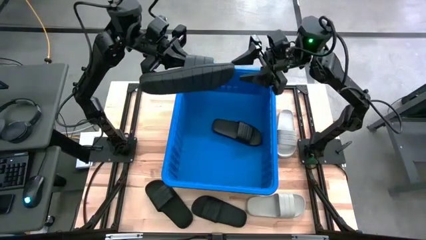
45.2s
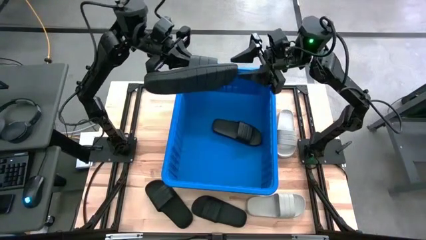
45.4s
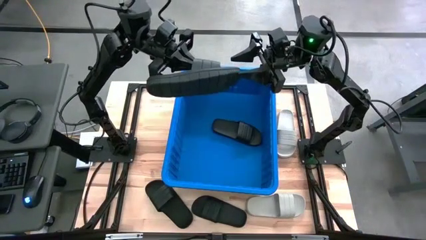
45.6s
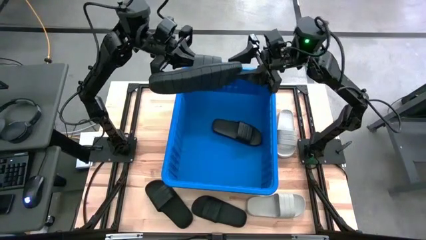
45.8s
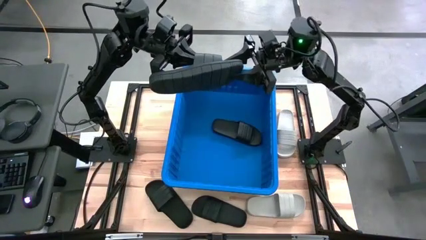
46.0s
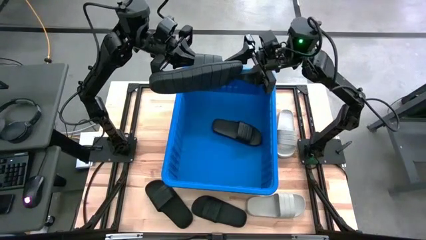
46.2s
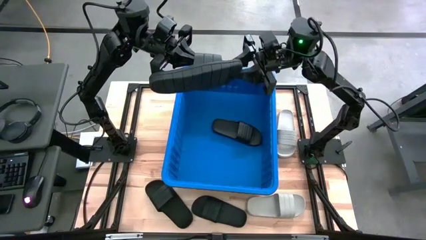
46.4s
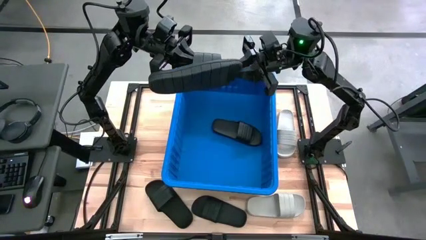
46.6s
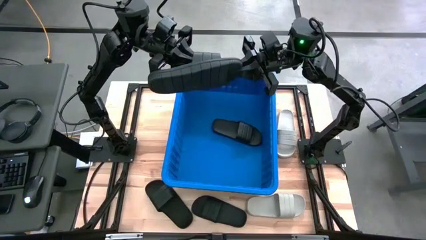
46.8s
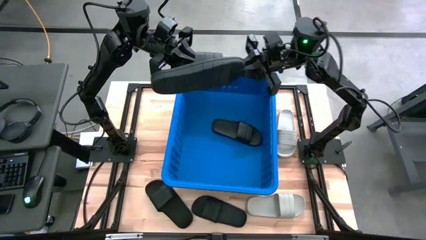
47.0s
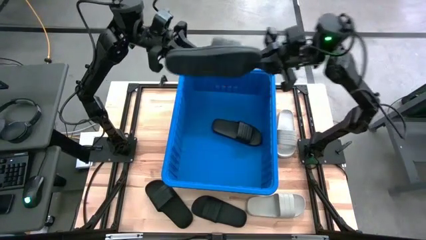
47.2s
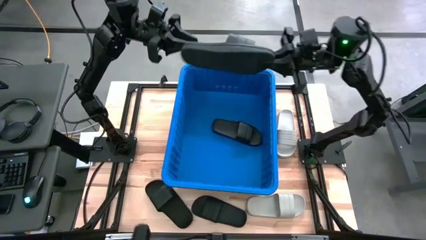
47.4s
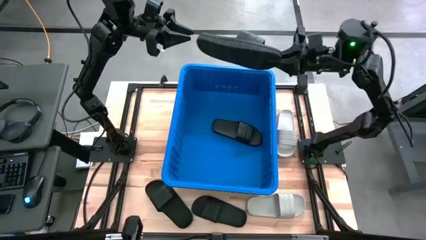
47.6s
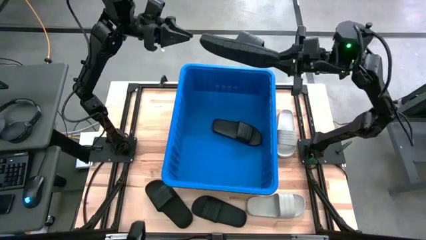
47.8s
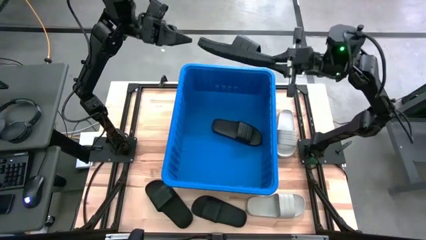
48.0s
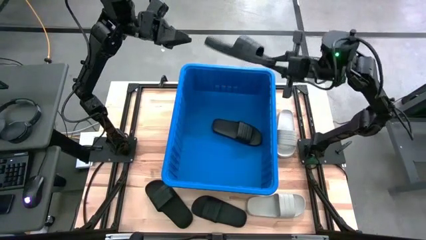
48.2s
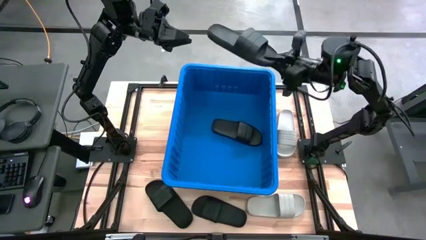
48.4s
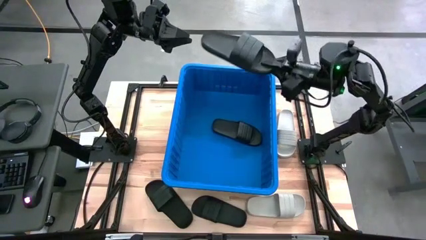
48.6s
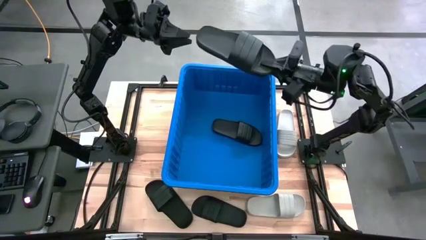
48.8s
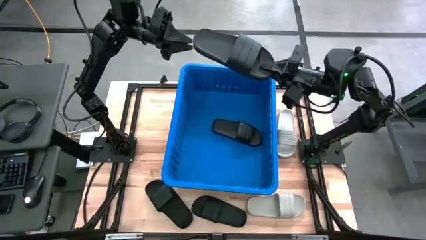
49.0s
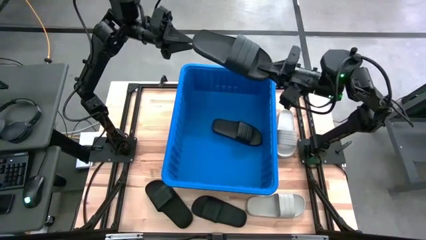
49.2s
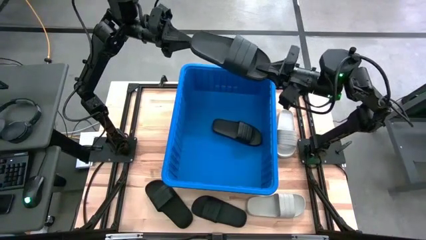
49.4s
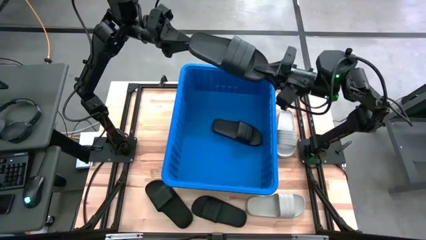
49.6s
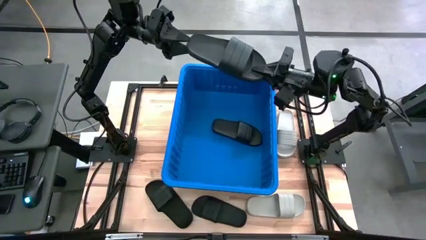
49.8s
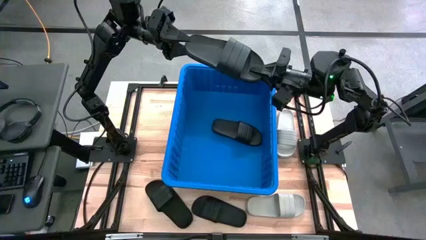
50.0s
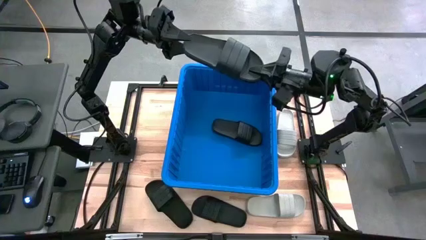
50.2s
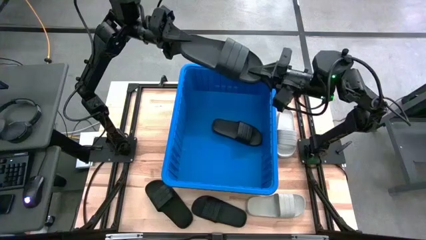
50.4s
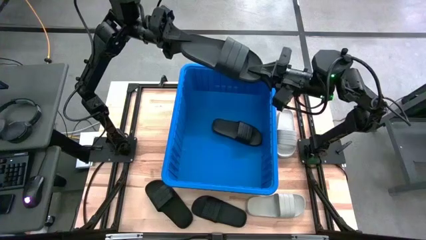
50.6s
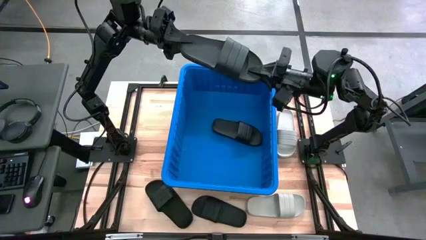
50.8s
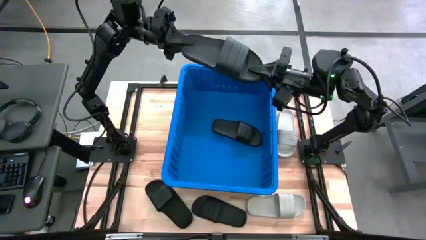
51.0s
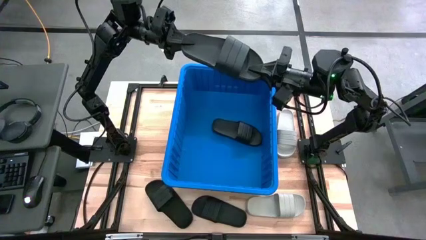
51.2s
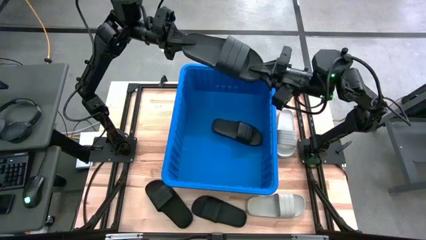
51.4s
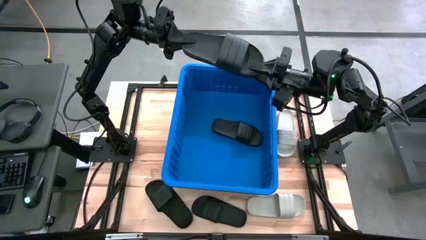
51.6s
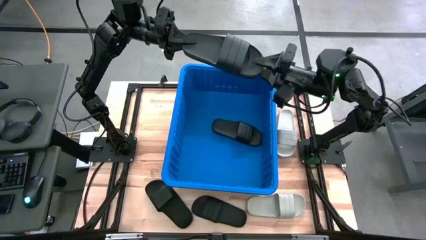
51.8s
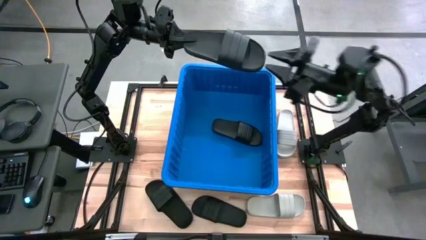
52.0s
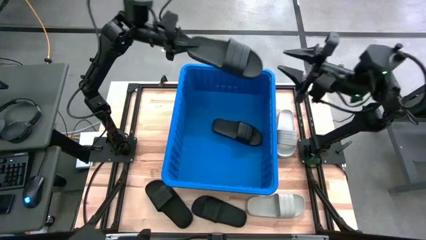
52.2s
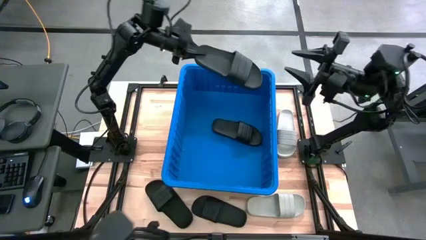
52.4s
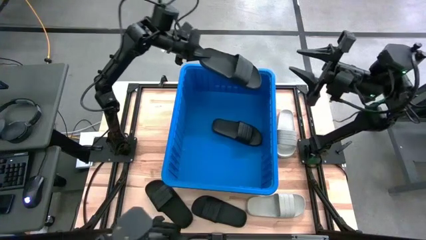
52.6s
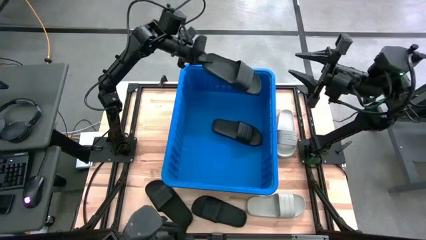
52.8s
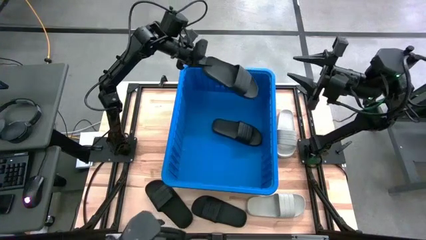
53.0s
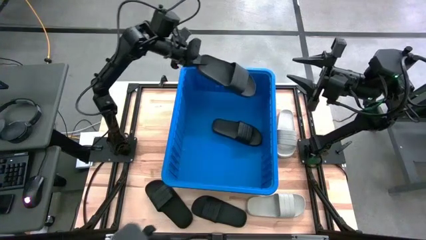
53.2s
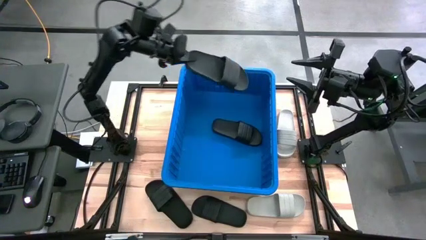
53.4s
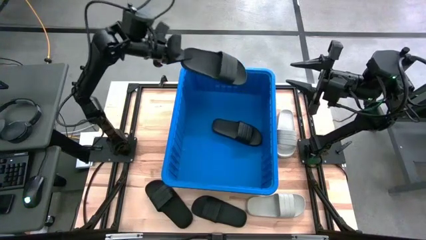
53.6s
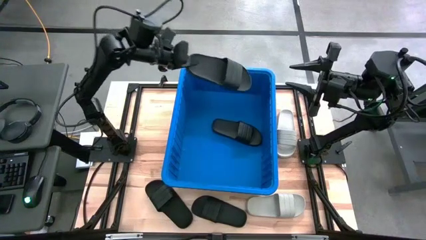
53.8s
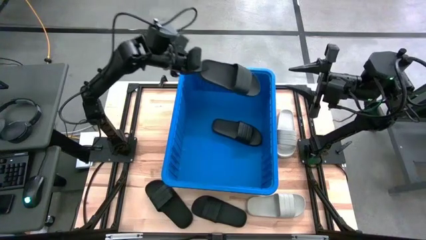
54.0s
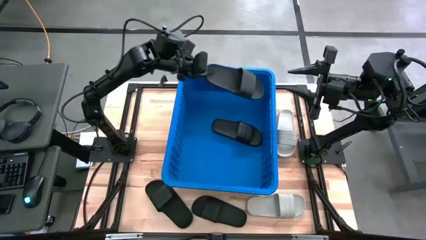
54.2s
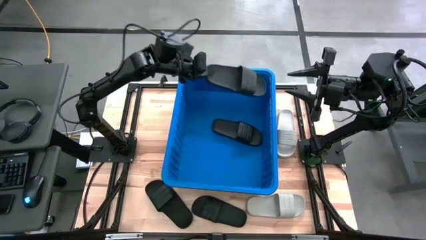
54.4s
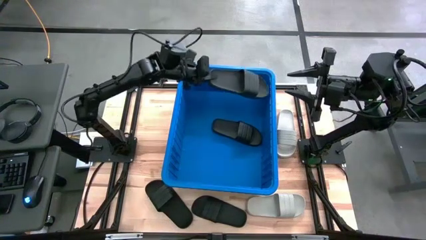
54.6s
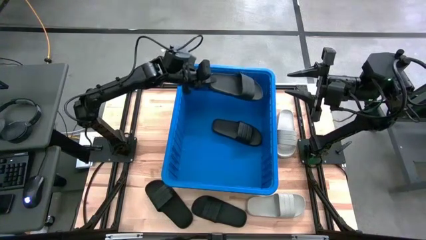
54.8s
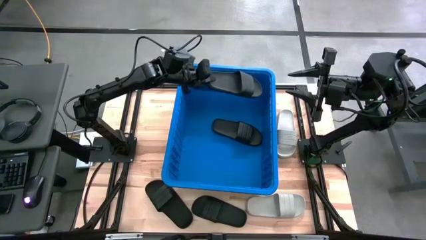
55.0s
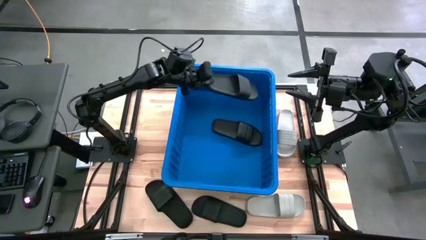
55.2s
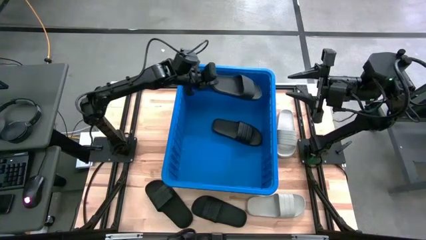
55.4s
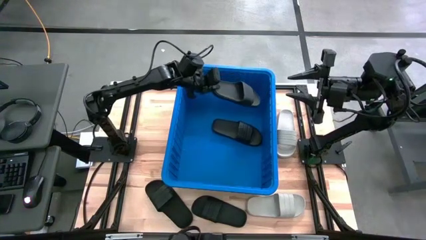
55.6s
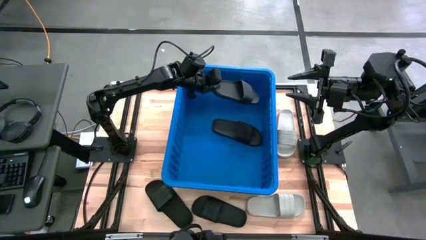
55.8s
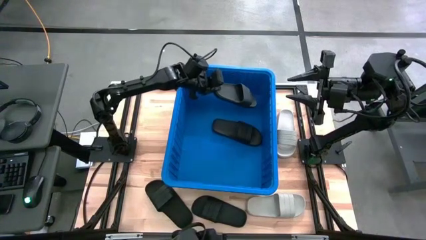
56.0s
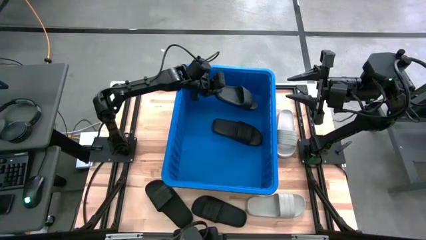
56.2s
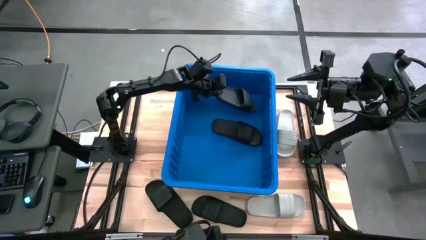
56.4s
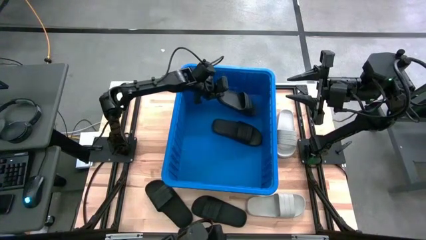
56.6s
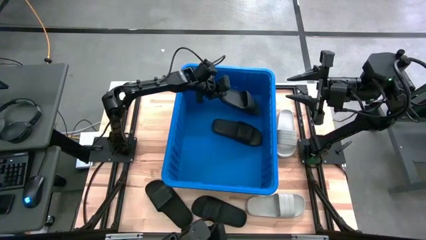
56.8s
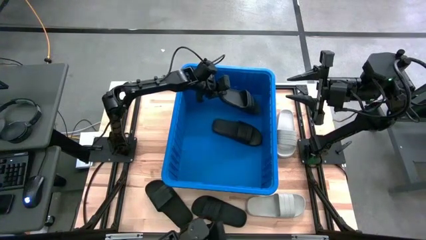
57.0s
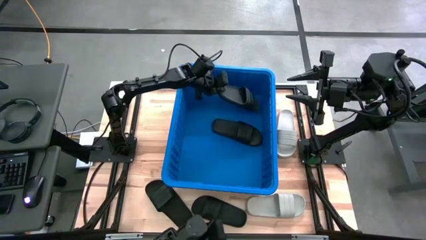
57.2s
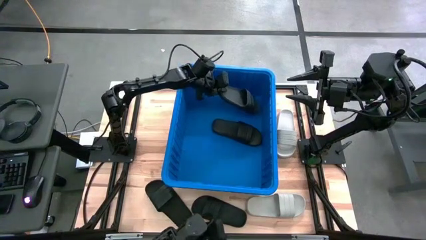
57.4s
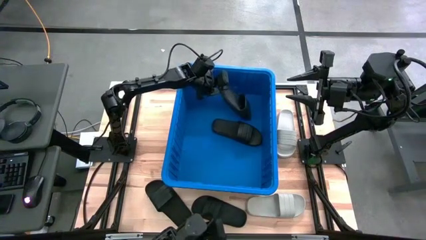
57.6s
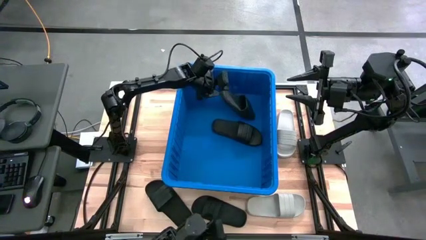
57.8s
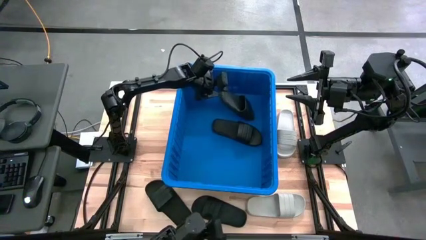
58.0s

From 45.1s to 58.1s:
Task: Pick and place slides into bin
Put the black slipper into the blue bin

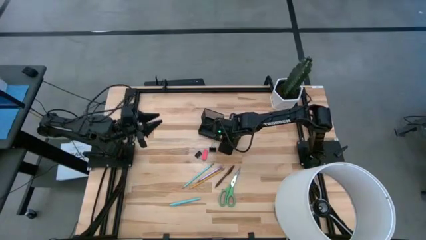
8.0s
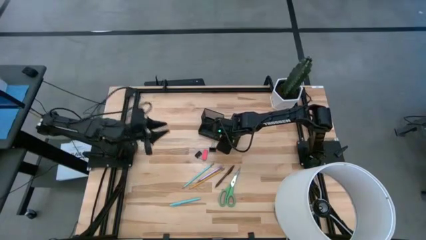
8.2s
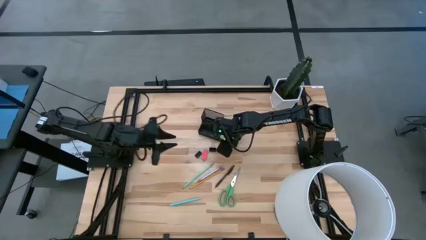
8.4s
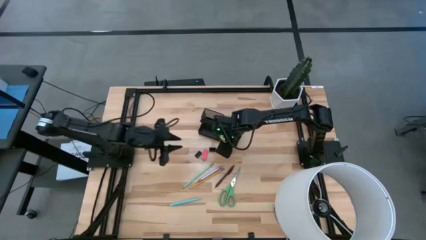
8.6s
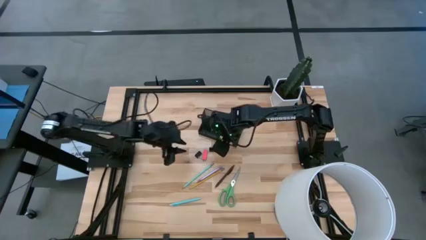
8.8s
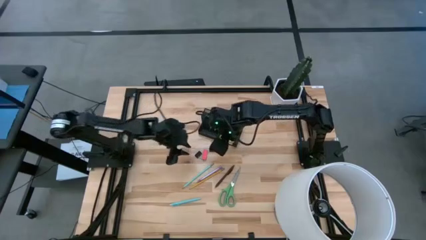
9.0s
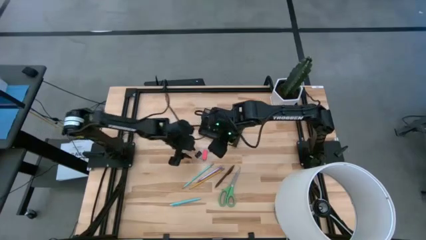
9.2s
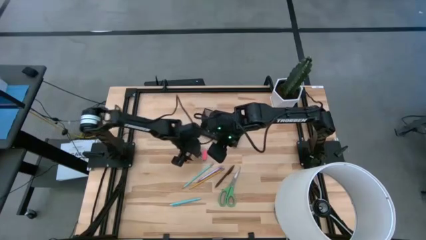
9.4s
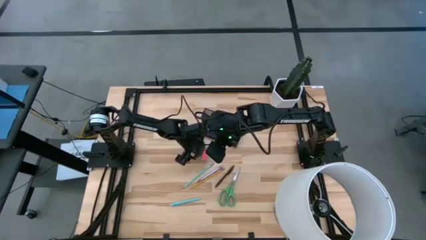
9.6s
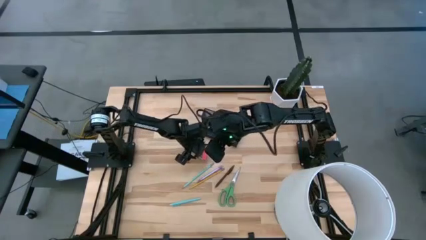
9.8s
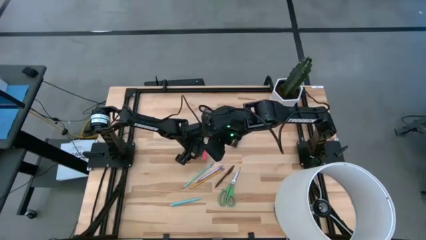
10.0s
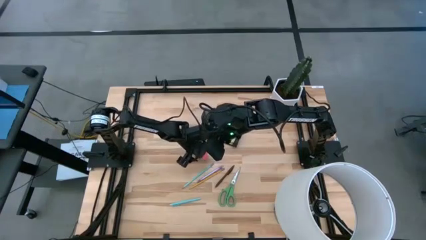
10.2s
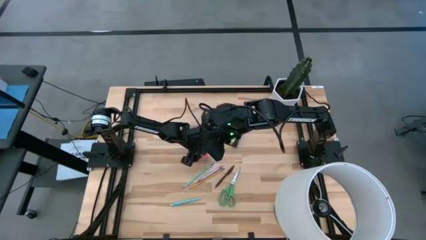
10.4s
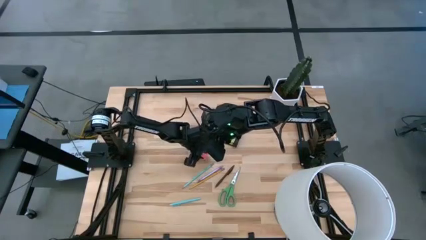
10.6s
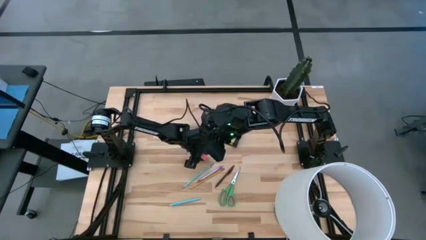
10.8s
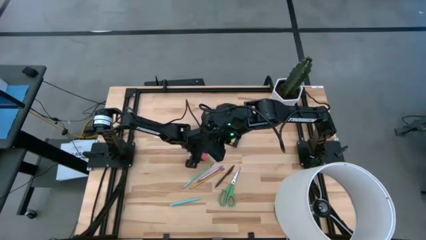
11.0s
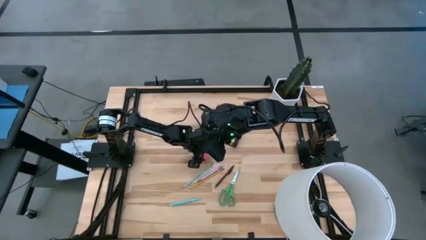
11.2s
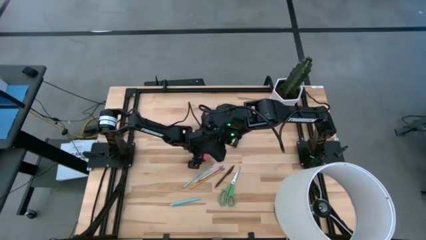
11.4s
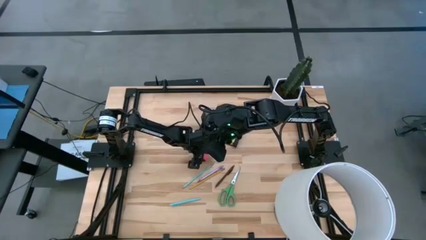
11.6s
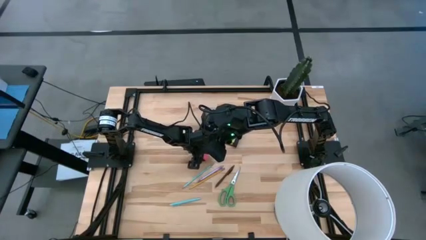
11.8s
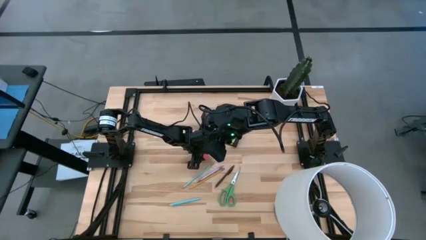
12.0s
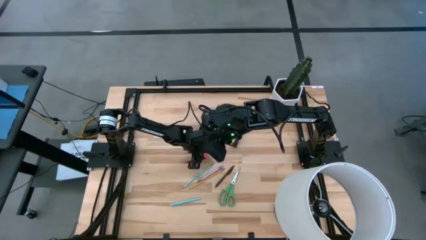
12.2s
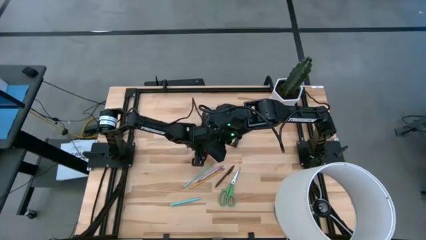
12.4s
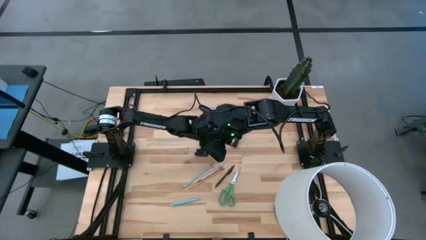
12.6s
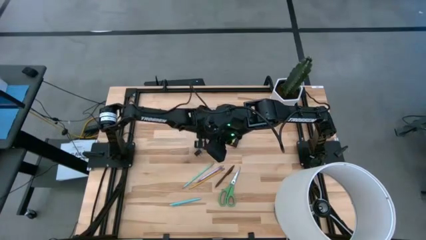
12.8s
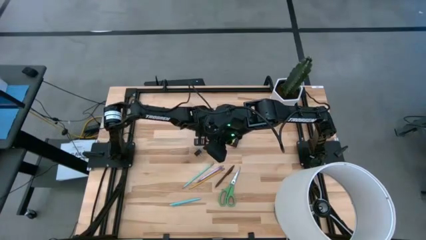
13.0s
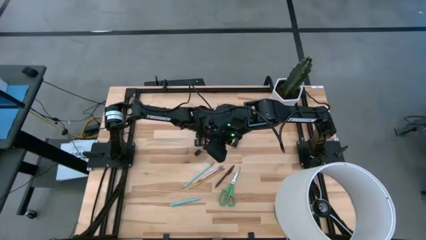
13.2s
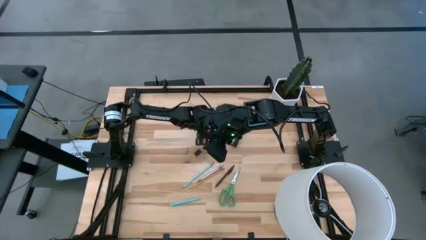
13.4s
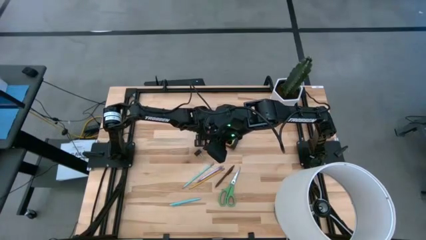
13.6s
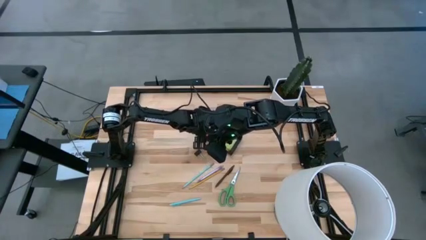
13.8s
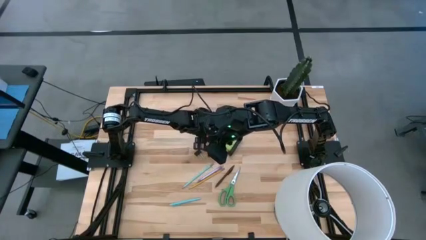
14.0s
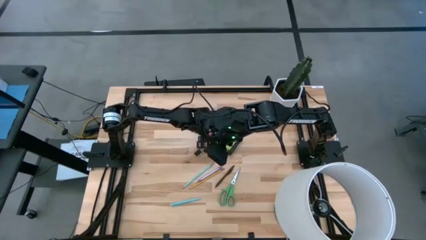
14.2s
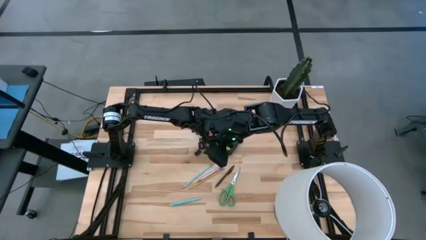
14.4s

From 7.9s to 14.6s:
Task: Pick and place office supplies into organizer
Put the pink eraser into the black desk organizer
